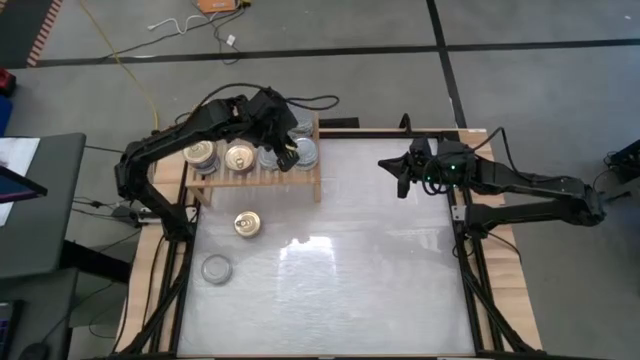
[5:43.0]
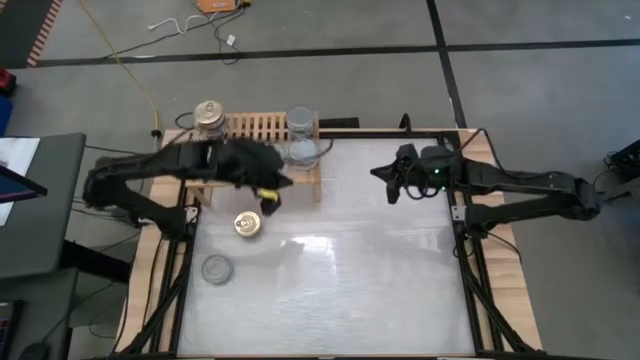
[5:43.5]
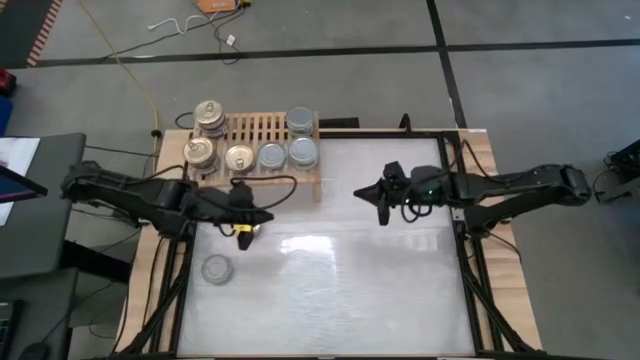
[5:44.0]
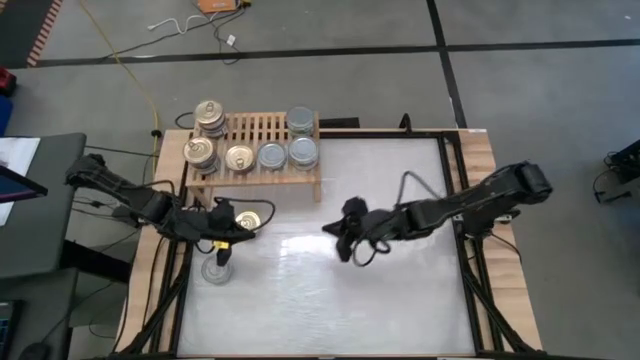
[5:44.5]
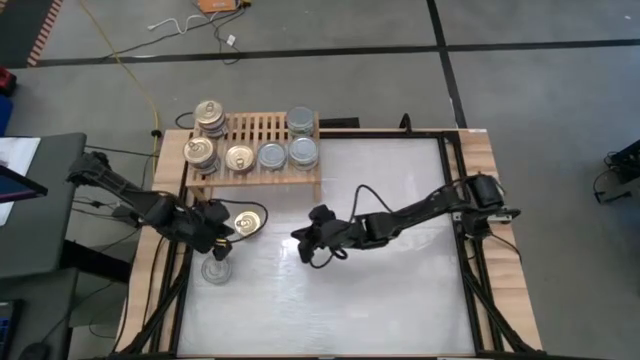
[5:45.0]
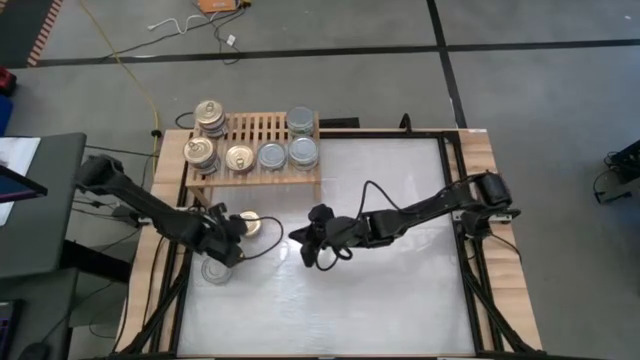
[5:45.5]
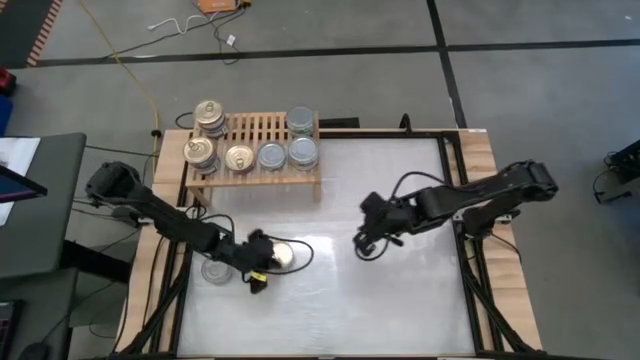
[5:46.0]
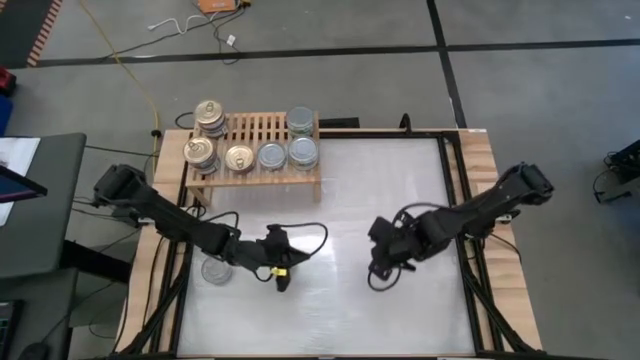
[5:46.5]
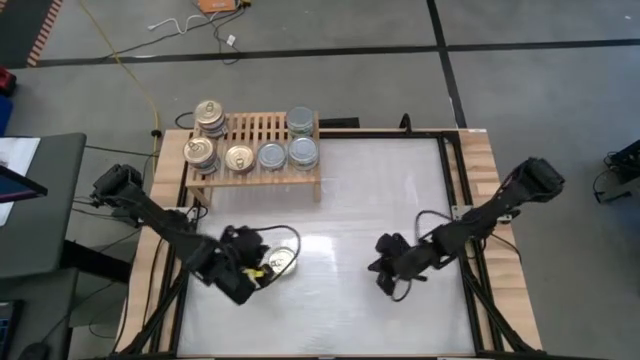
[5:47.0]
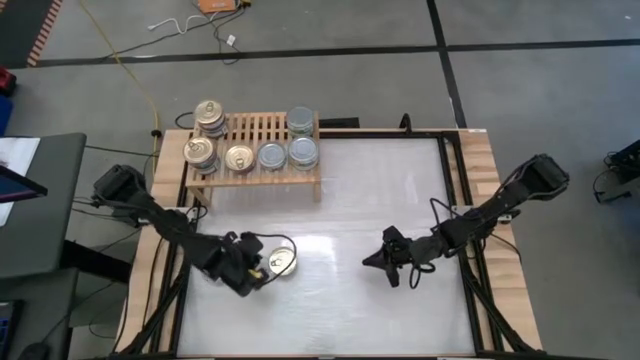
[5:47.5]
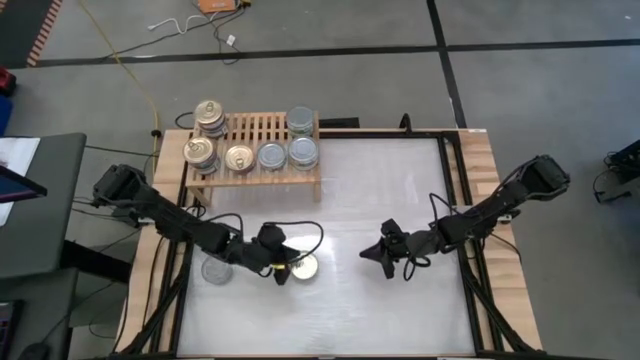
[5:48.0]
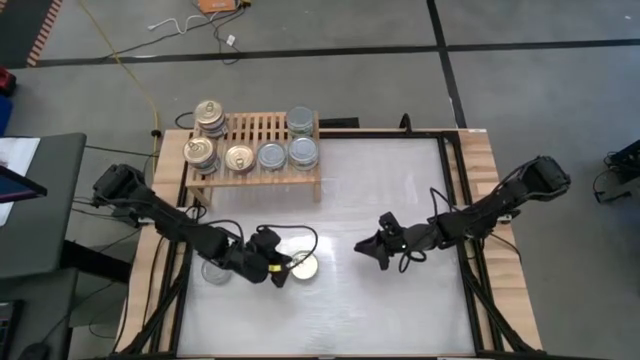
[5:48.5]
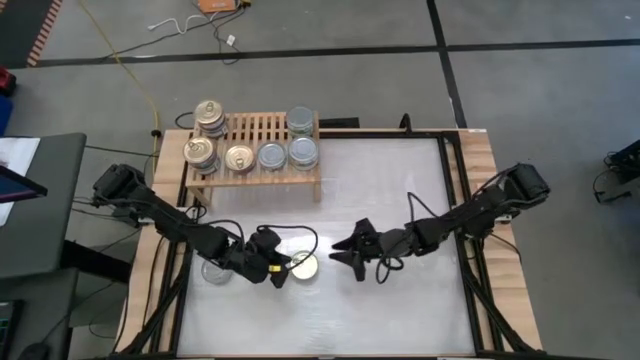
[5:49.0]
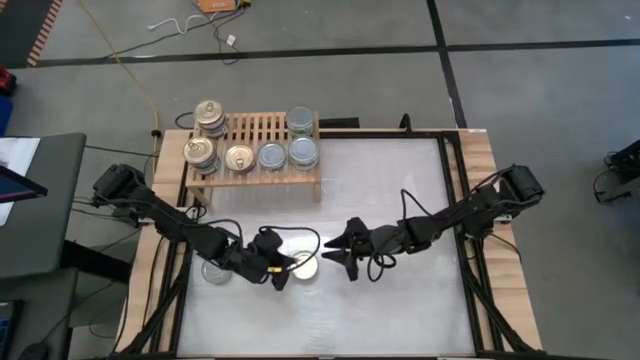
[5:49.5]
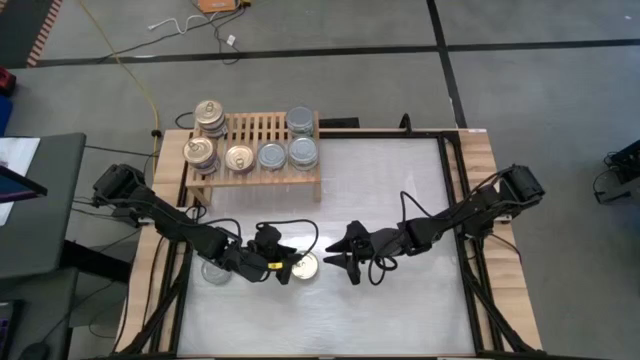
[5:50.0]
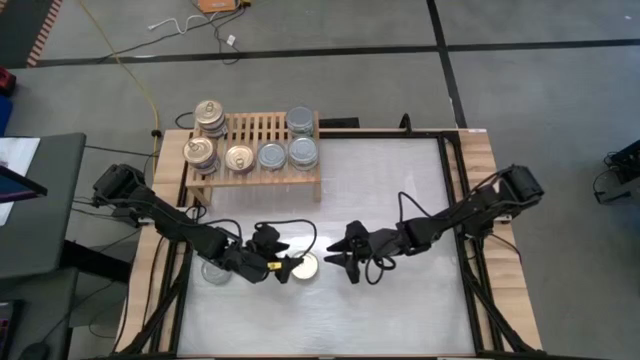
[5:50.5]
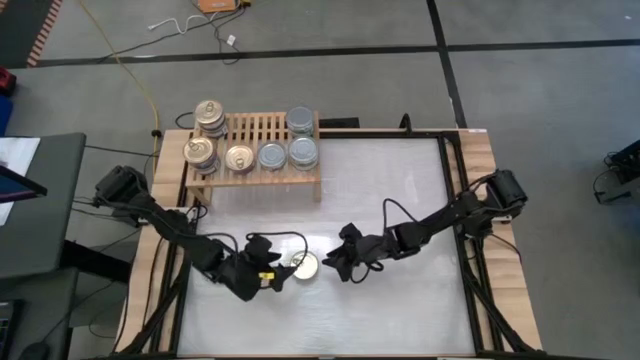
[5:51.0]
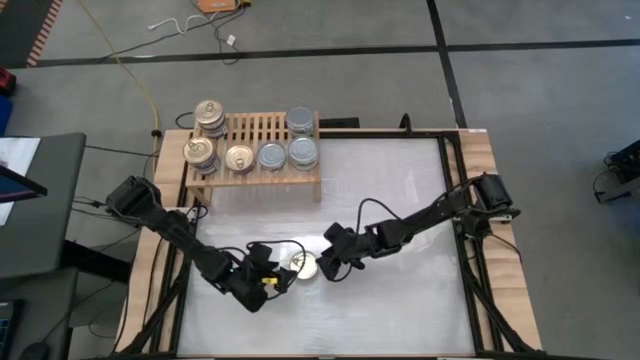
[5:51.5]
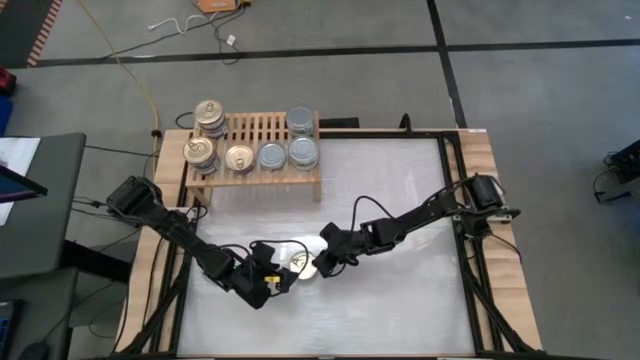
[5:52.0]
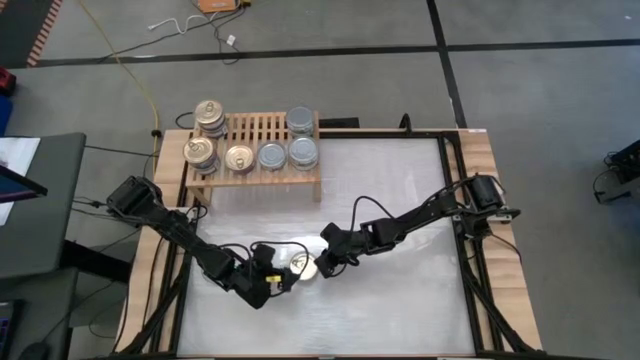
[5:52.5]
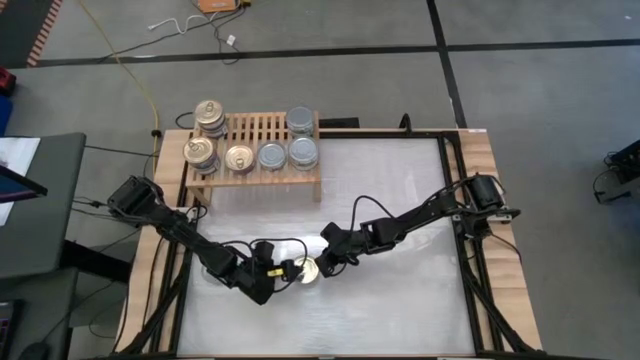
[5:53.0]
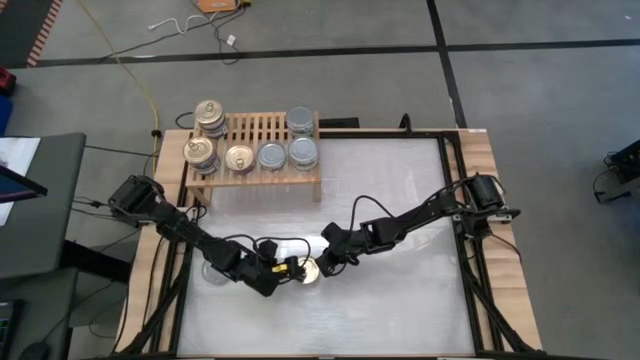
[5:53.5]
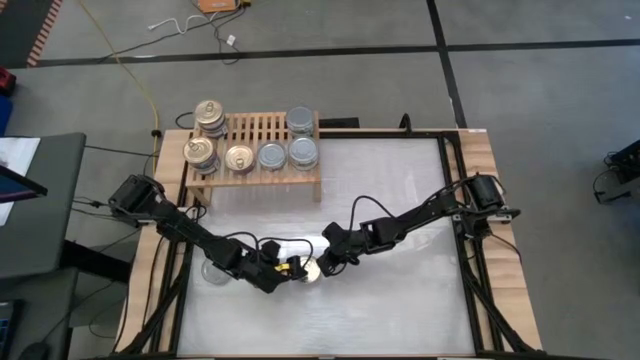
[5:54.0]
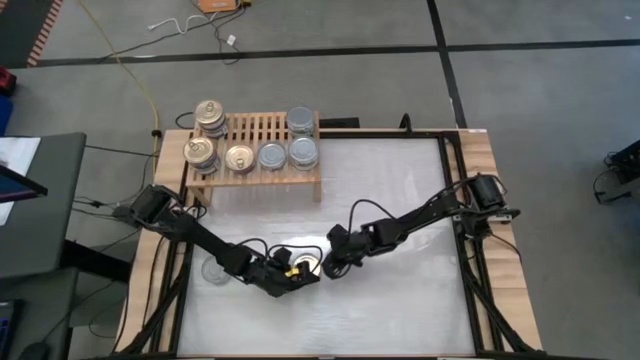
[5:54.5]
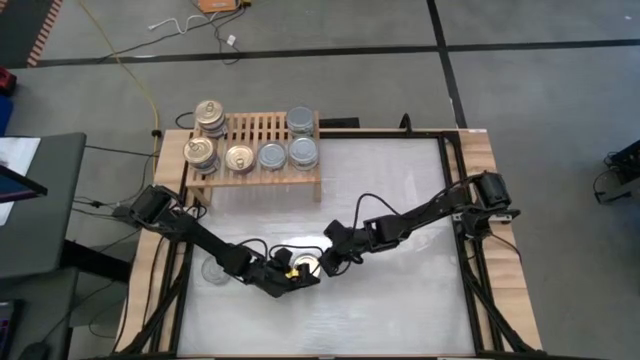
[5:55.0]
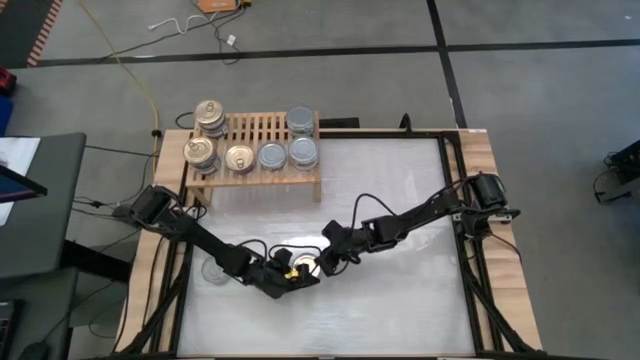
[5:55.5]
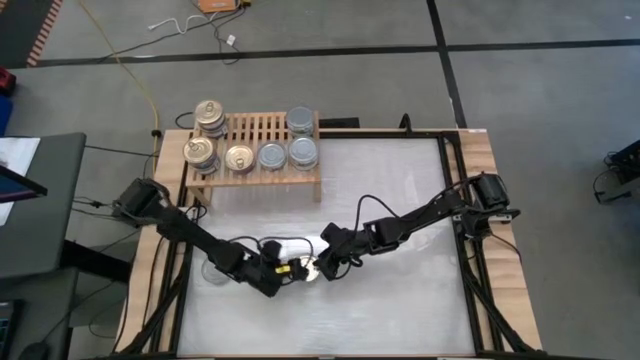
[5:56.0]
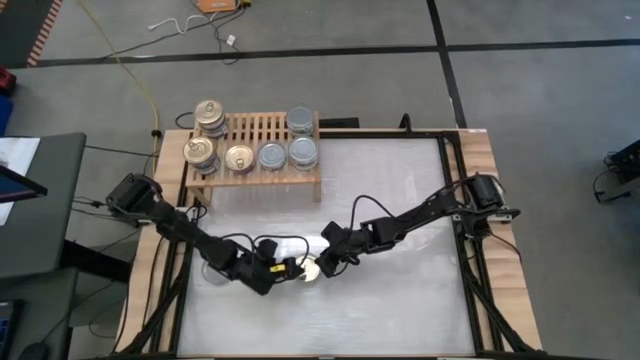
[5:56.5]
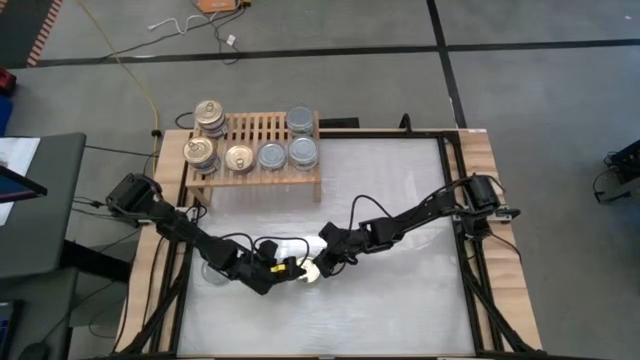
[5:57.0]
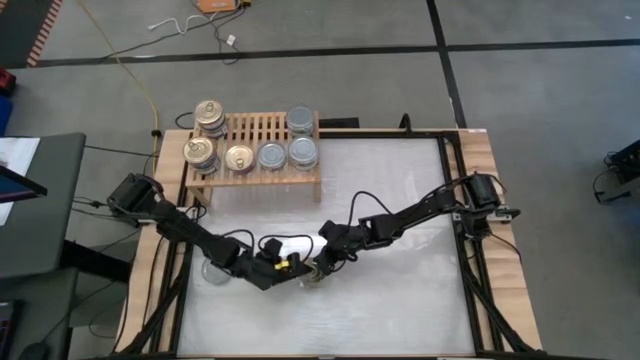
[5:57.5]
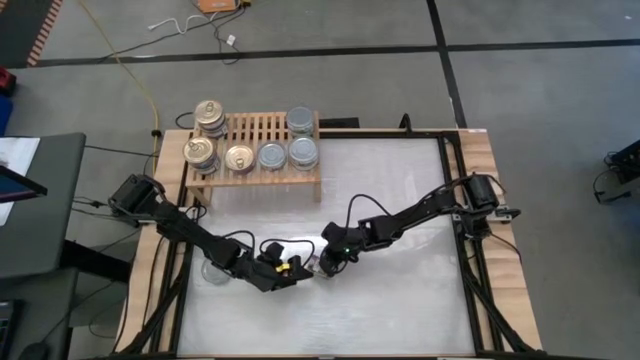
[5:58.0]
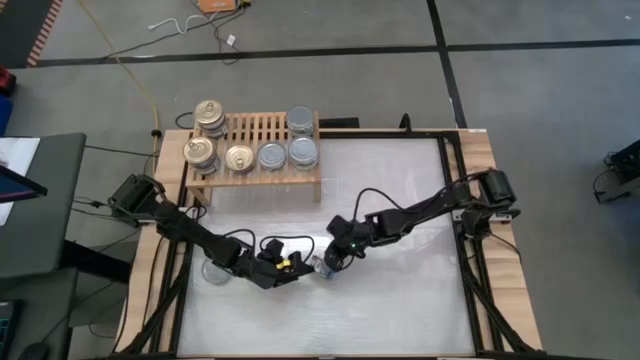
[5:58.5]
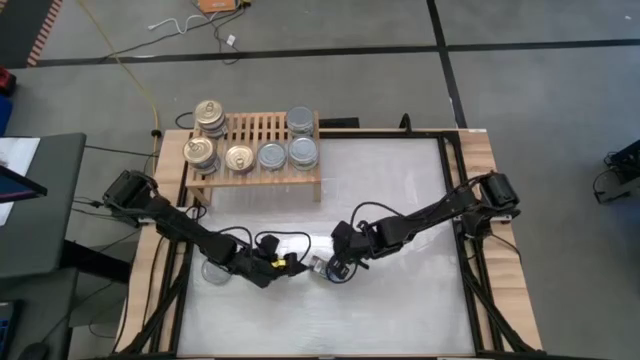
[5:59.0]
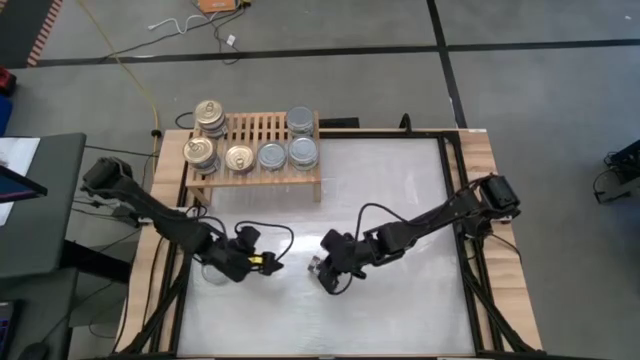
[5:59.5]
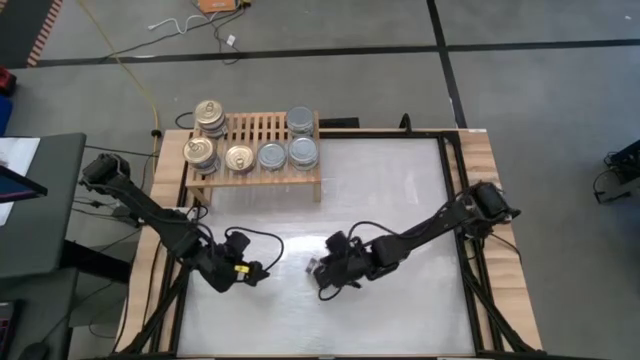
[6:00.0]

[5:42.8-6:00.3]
Task: Stack canned seafood by type on shelf
Stack the blue tuna can on top of the bottom right blue tuna can on the shelf

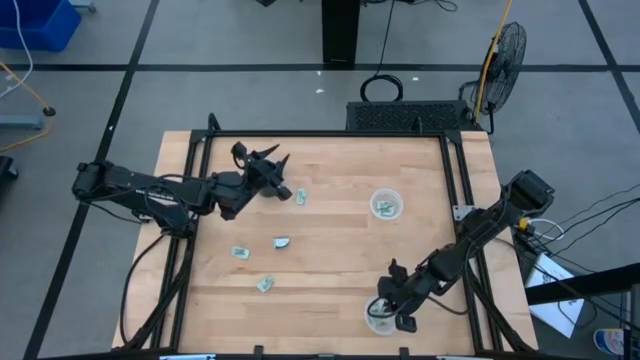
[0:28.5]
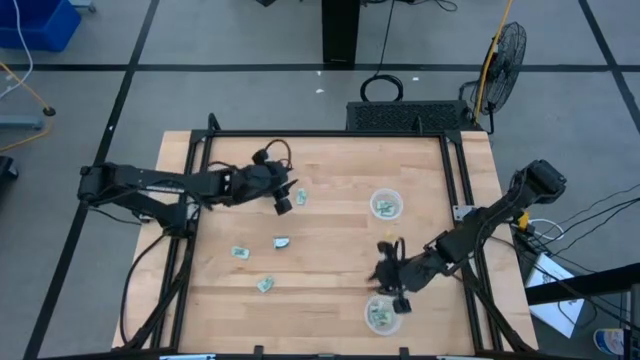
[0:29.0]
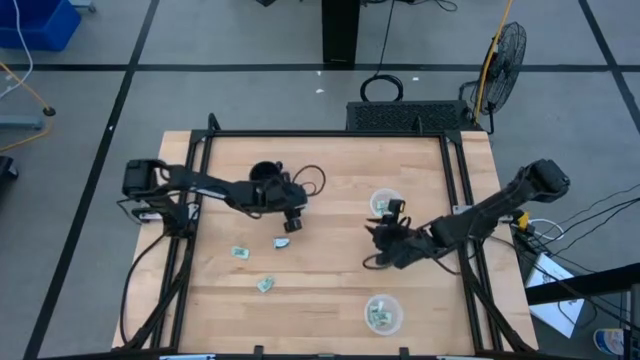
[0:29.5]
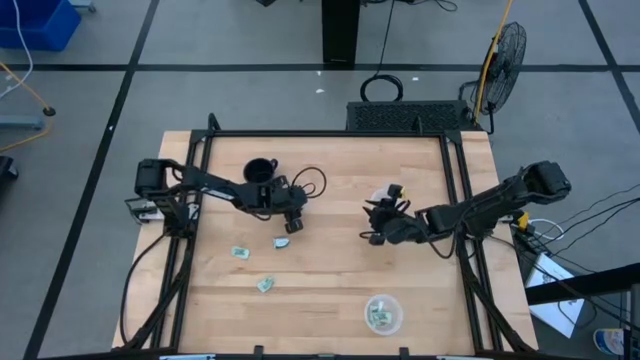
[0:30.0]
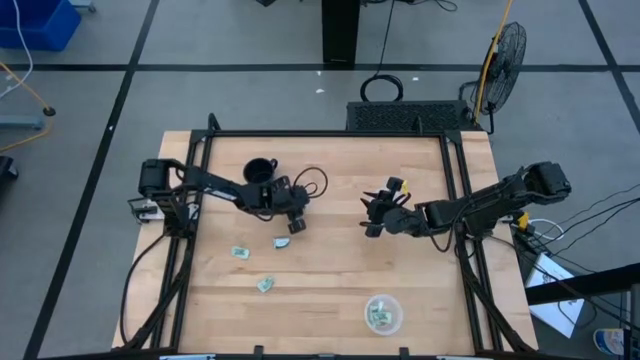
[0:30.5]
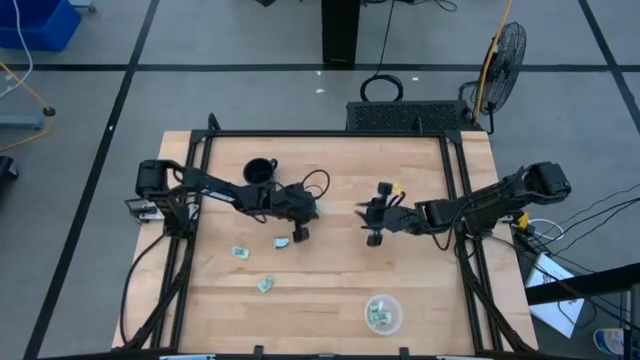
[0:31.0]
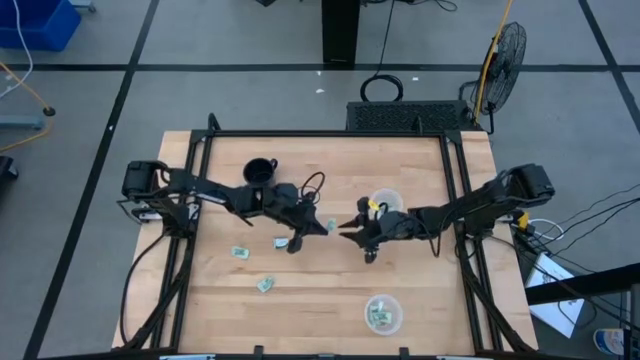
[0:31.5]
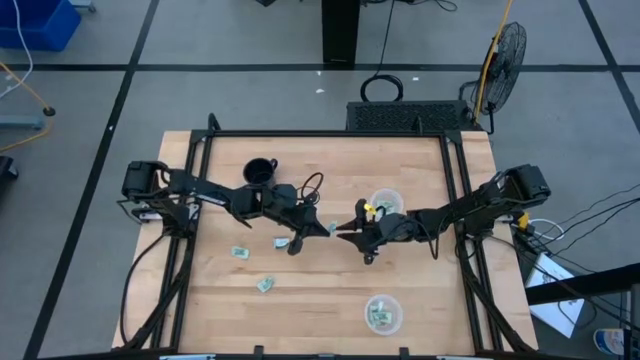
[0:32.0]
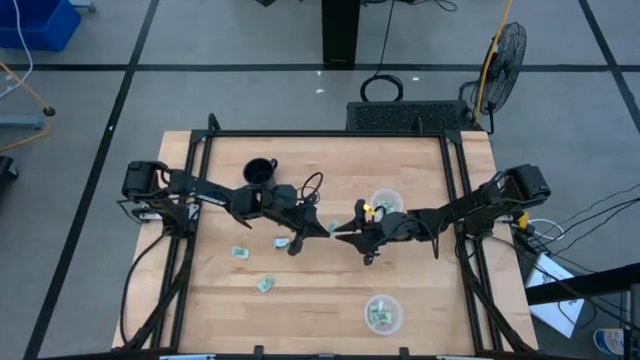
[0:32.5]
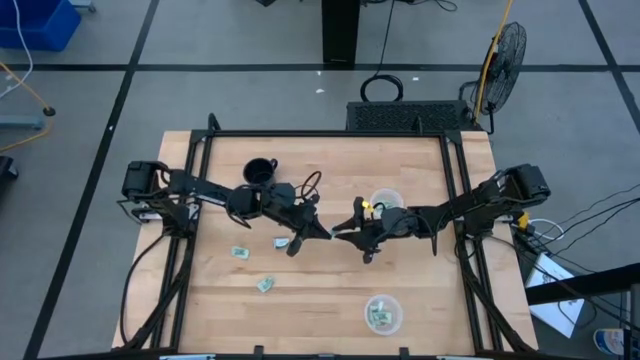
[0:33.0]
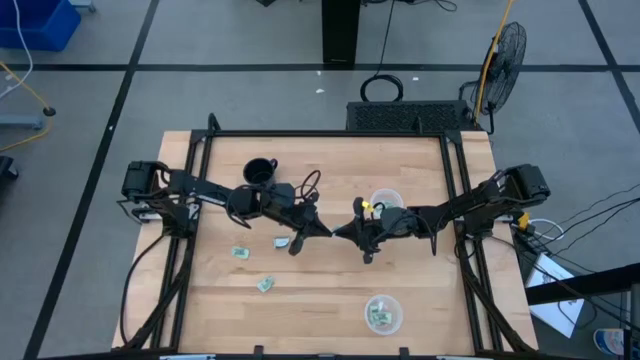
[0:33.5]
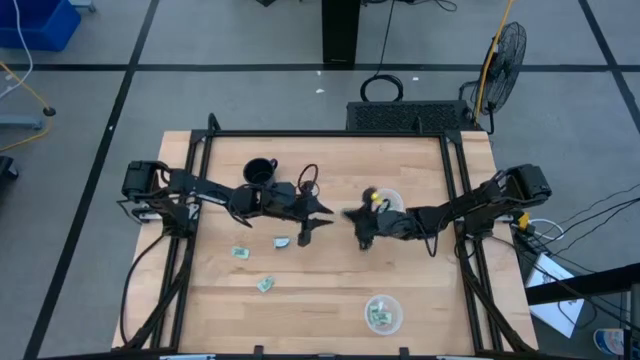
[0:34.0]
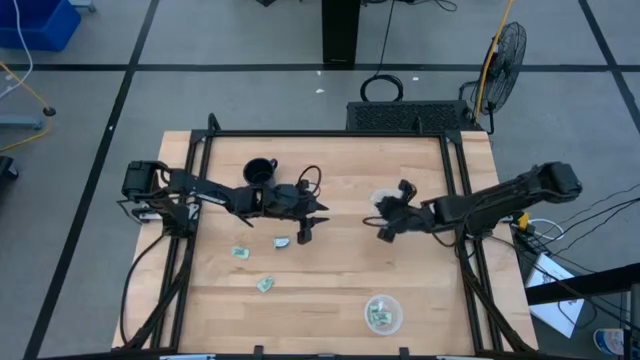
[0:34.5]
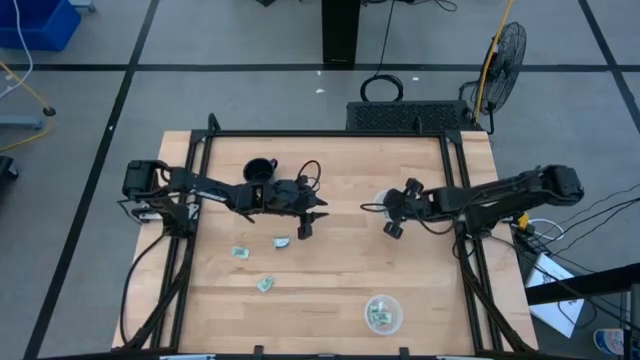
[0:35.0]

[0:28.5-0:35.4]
Task: Pick and place Stevia / Truvia into bins
Put the light green stevia packet into the top transparent container
